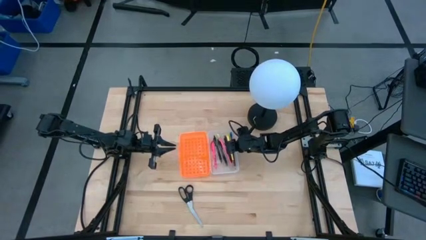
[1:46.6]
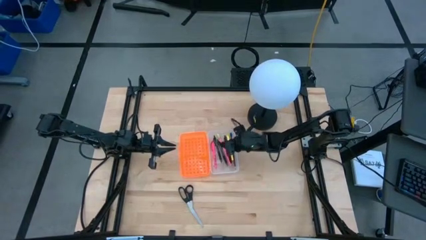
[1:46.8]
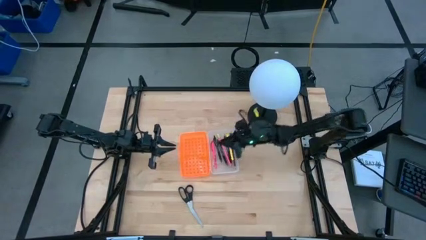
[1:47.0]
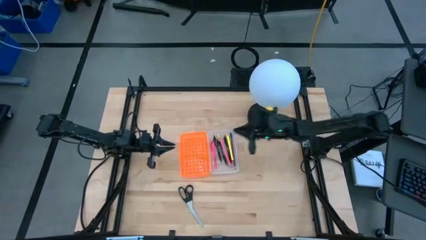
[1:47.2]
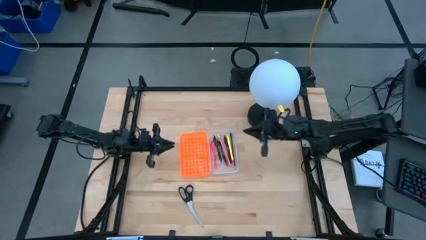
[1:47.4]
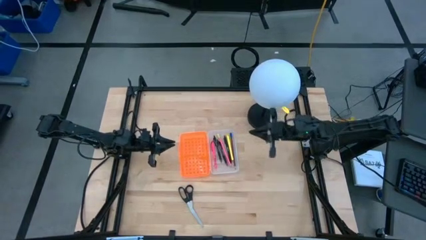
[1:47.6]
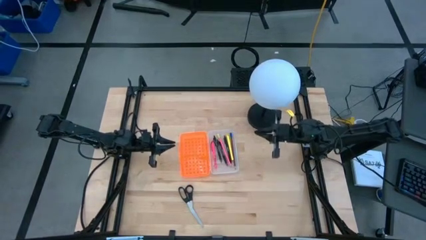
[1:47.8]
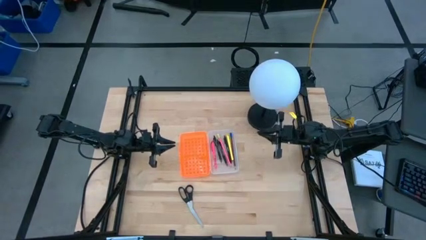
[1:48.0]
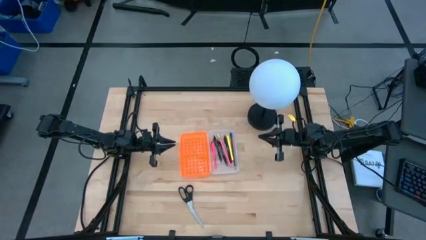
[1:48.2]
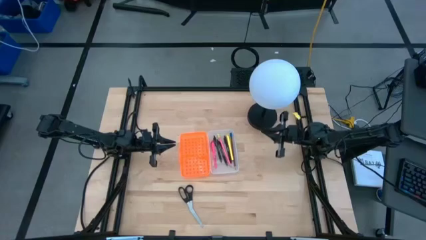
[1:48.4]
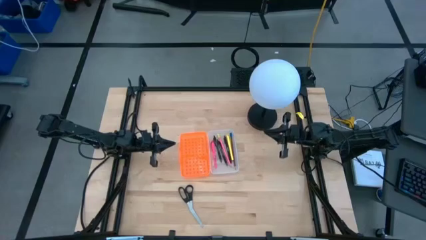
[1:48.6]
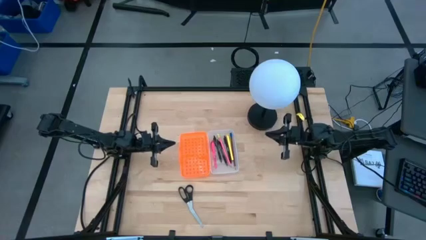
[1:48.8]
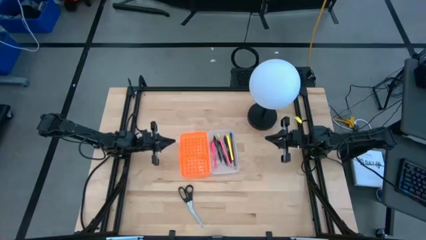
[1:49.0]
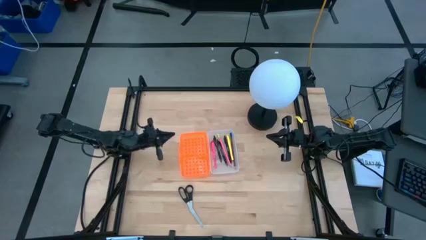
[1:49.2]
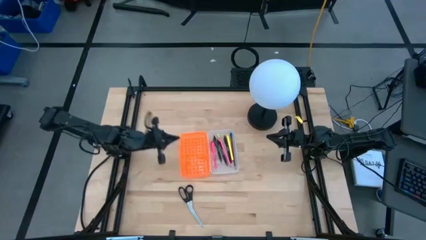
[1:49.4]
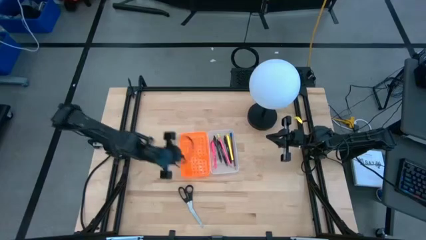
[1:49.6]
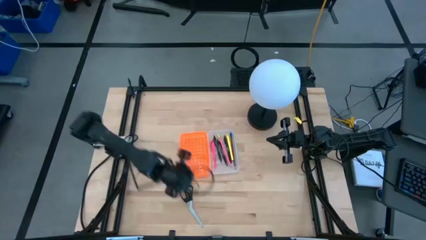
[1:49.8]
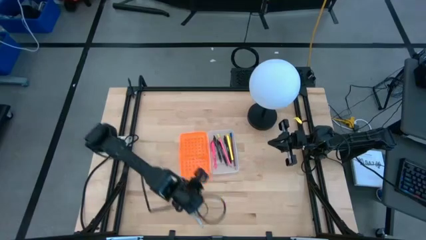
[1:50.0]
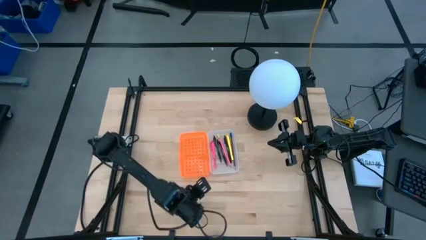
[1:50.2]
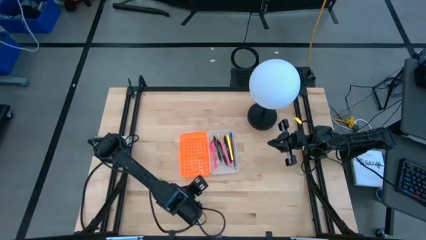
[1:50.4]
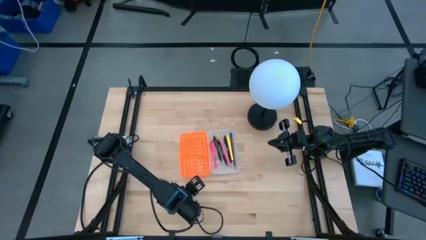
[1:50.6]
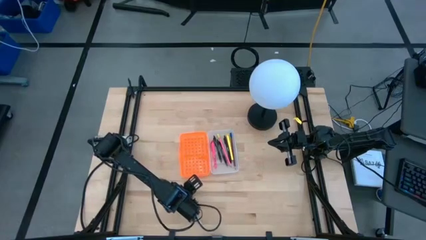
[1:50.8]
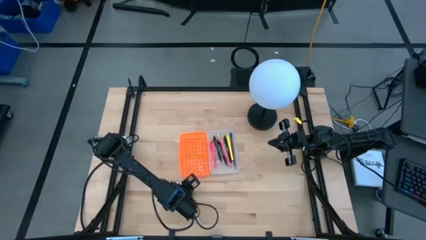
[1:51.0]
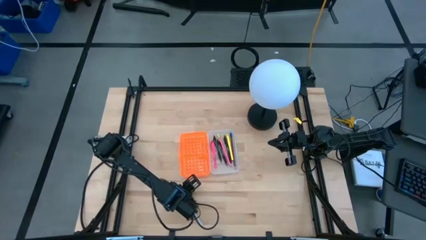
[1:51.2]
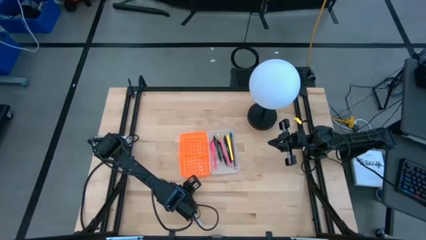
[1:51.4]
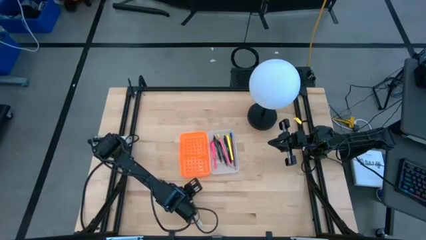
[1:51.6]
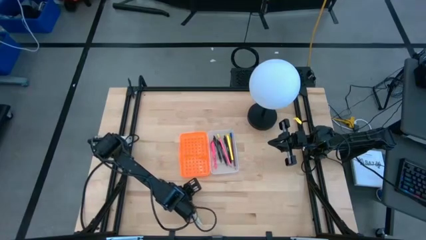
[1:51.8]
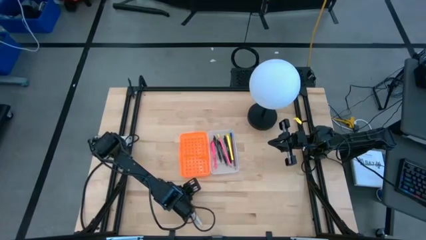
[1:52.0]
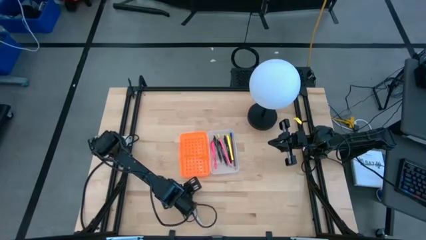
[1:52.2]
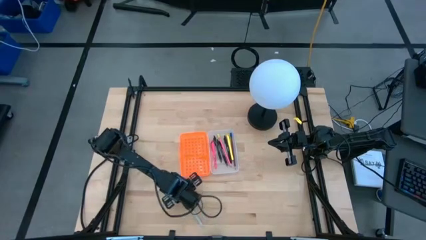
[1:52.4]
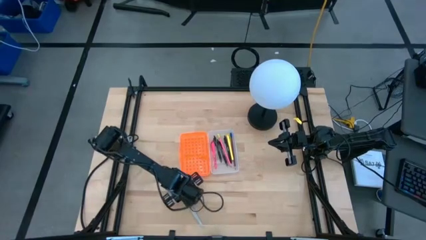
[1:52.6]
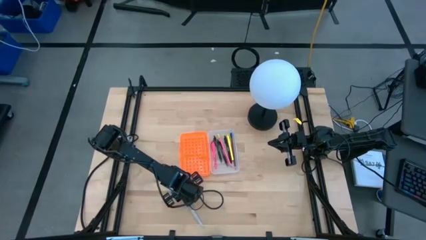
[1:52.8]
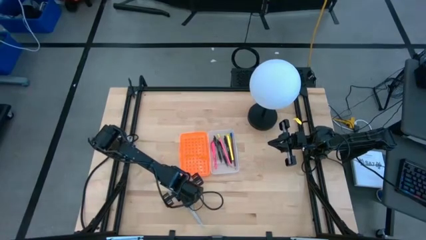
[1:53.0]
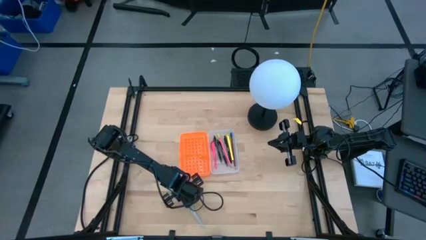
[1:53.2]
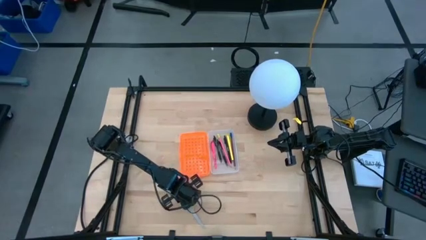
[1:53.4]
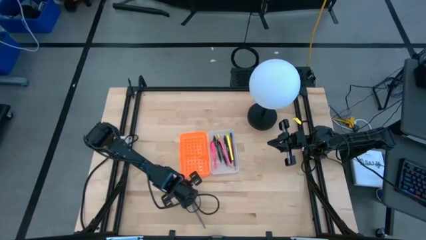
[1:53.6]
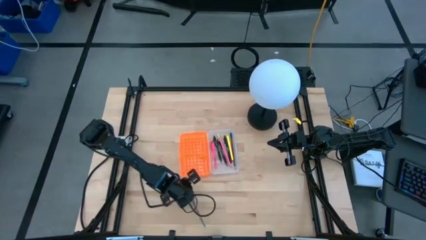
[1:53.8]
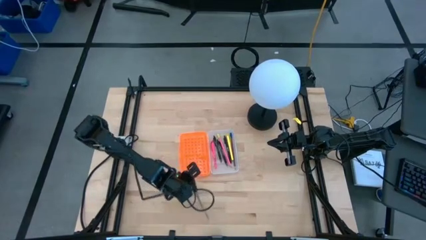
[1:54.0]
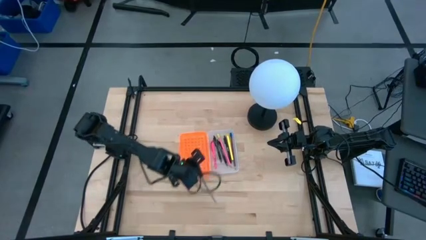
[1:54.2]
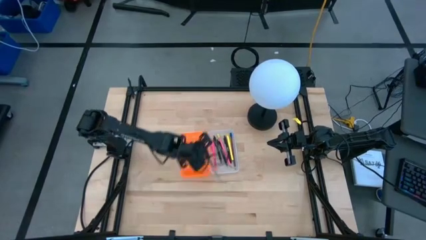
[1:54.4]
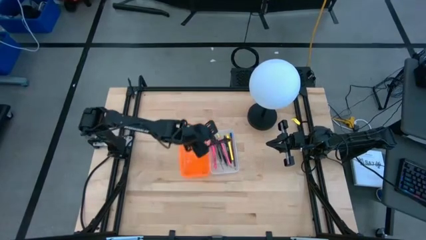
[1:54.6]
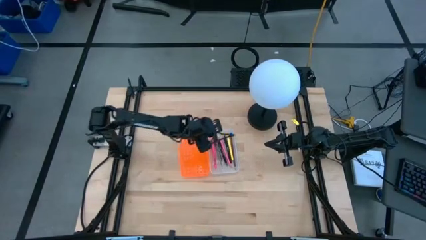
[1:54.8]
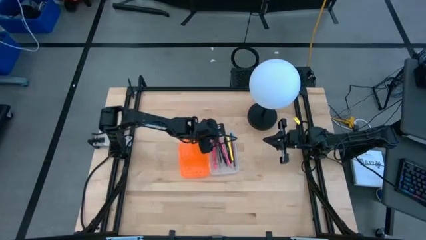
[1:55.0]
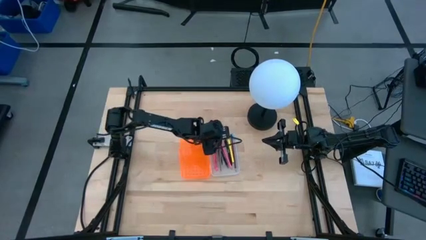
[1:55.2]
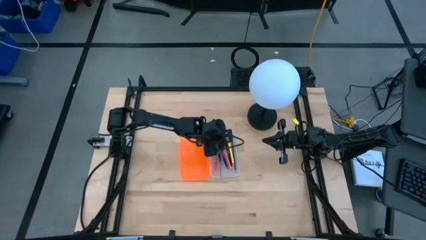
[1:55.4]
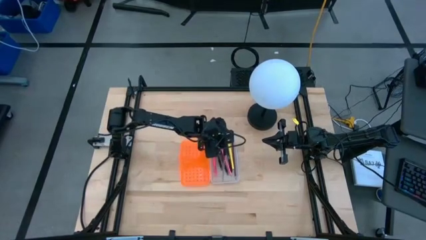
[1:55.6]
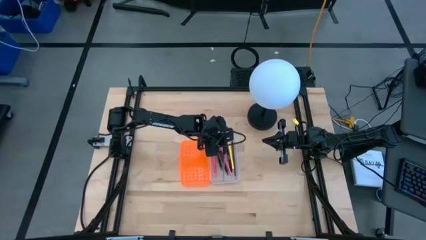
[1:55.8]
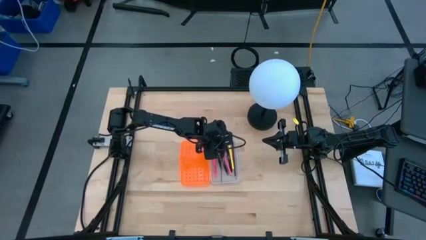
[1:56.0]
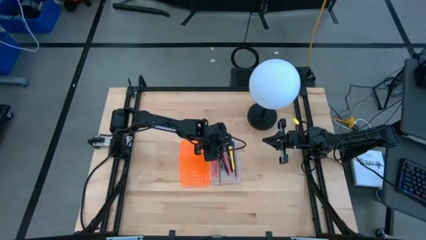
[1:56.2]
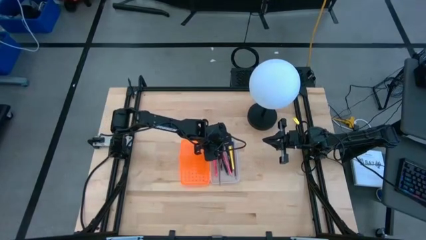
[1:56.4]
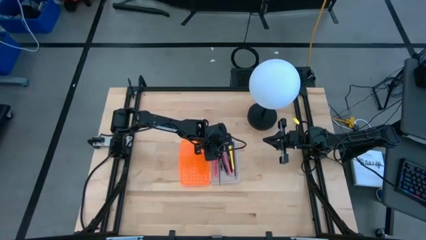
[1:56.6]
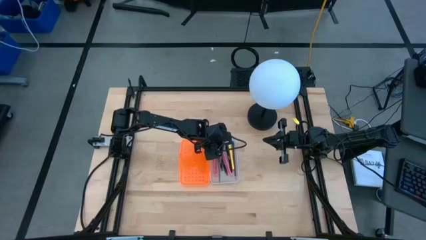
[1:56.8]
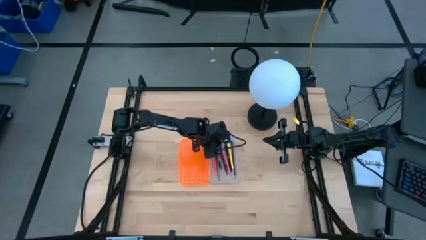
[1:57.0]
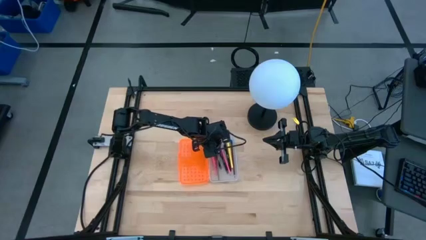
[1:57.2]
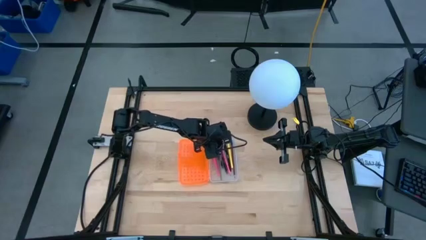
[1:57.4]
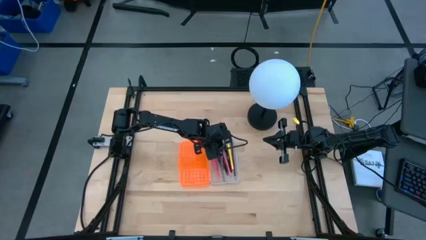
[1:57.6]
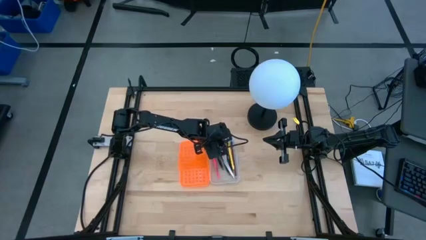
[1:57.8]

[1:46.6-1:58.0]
Task: Pick & place school supplies into a supply box
Put the black scissors into the supply box

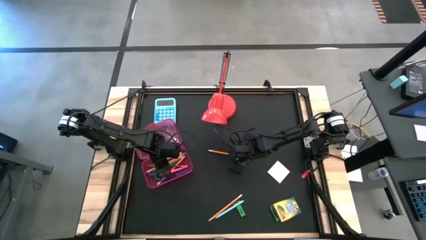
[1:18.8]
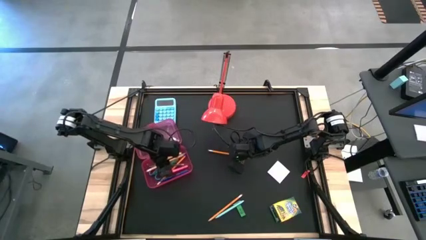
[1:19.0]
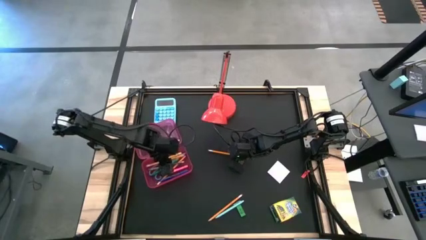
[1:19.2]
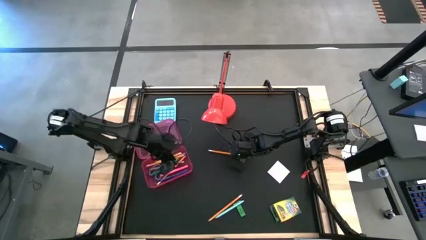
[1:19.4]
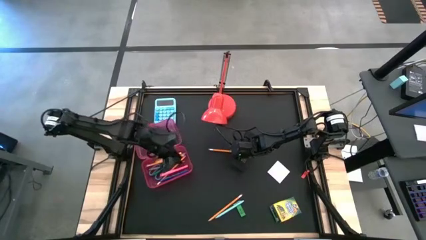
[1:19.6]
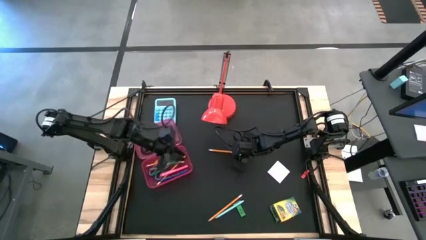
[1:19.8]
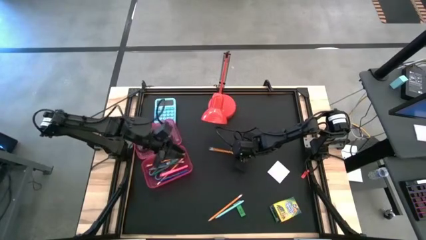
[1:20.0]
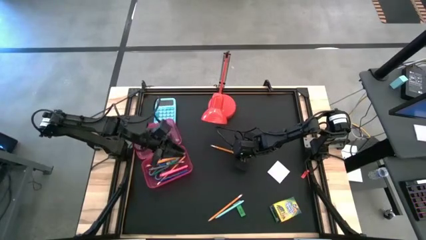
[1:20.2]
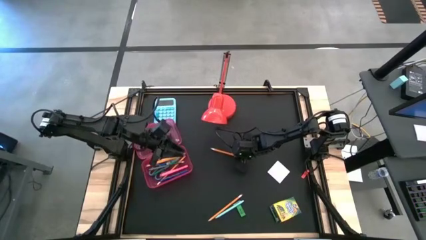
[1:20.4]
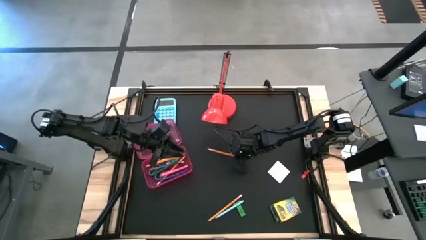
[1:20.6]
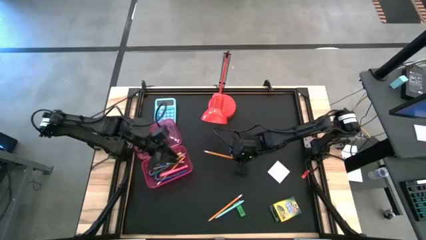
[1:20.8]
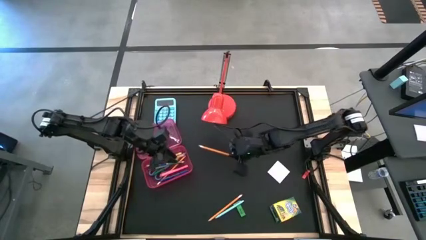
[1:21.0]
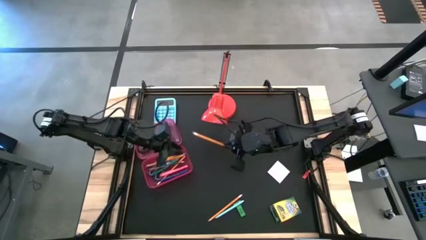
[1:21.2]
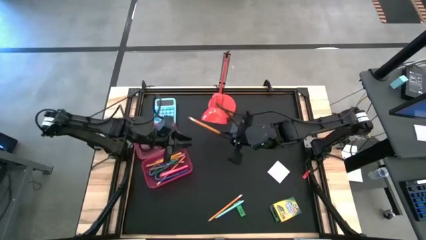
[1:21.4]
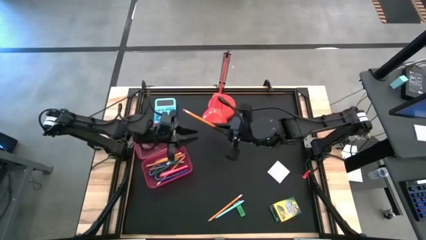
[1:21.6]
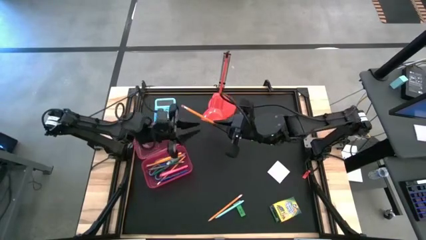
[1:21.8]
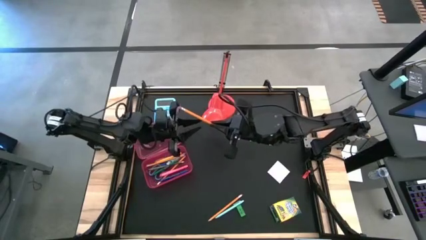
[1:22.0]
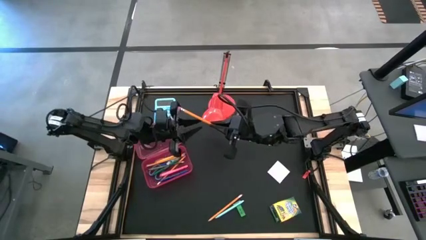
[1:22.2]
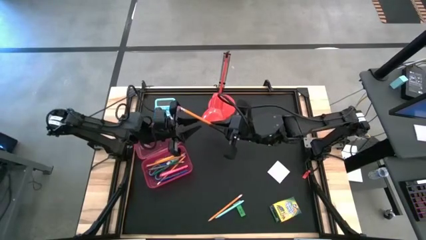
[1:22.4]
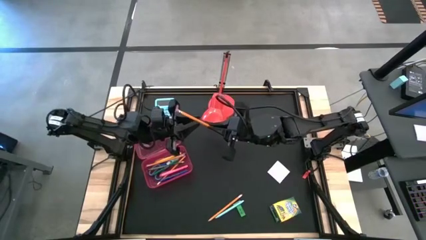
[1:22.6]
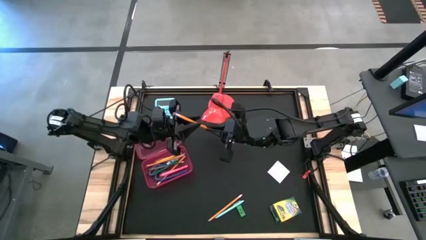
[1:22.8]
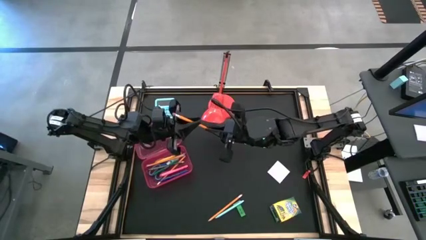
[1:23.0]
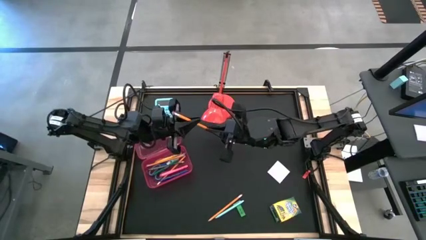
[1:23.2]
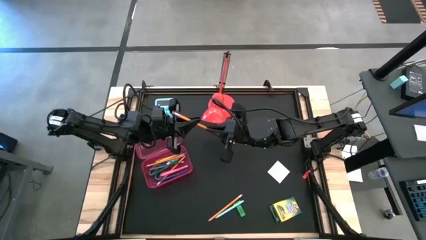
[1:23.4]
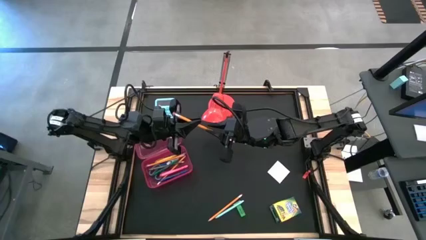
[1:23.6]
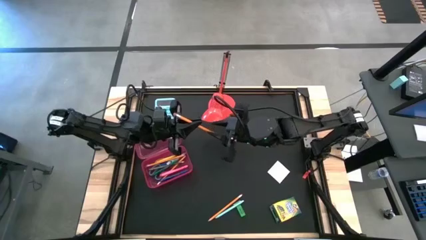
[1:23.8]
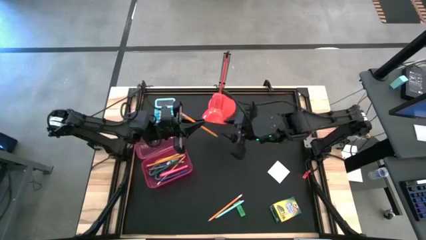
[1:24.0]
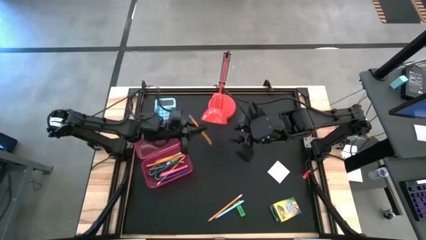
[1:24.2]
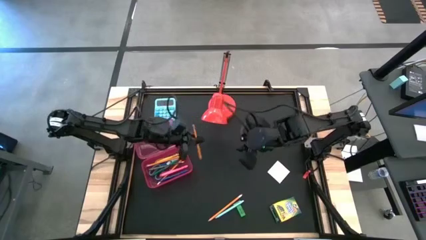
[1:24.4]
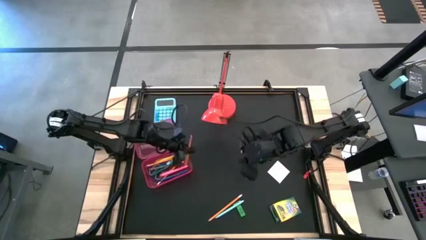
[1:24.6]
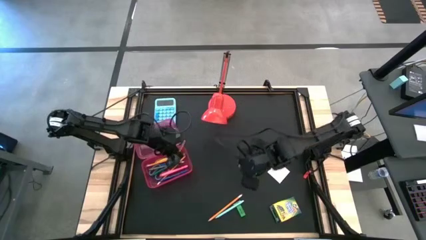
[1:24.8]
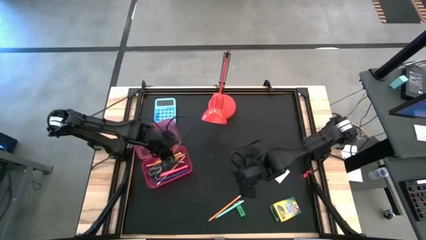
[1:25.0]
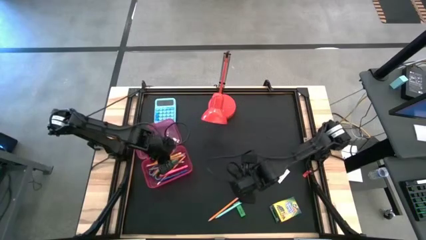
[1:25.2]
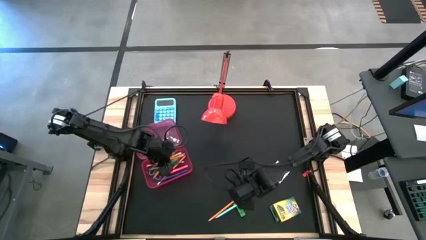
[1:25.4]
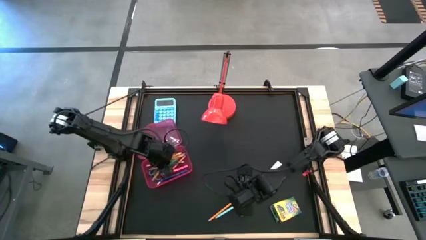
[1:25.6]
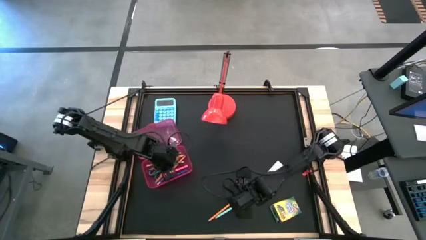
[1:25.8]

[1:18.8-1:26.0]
Task: Pack school essentials
Put the orange pencil into the red supply box
